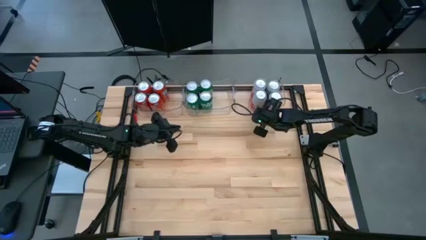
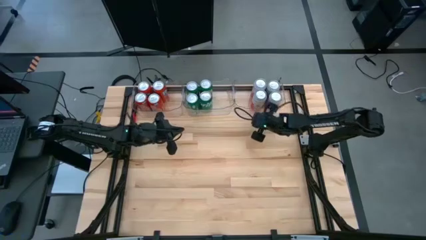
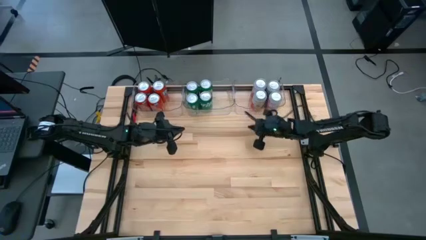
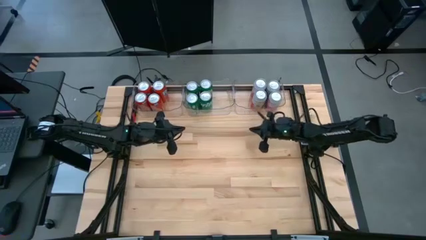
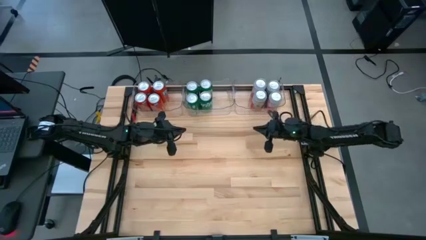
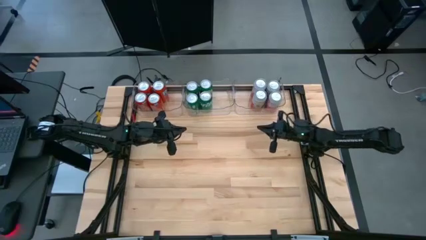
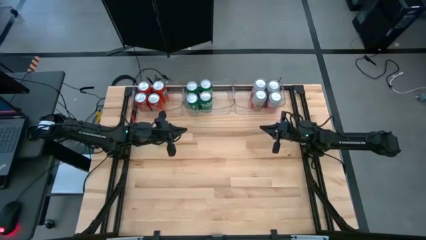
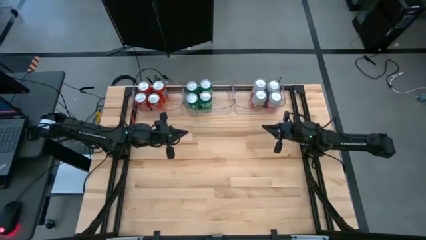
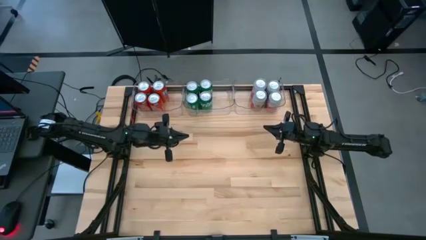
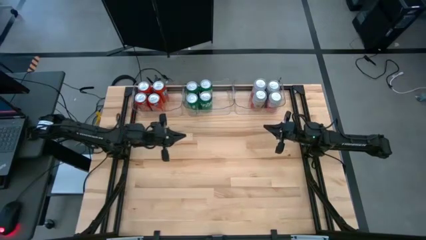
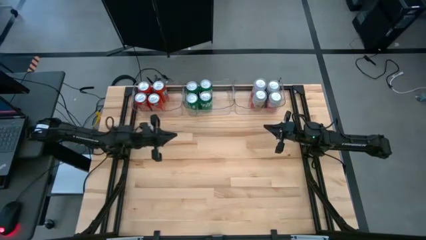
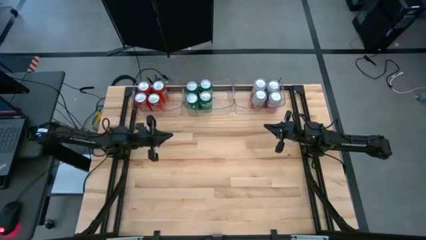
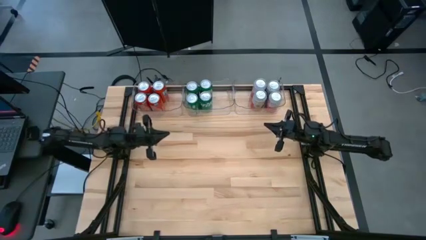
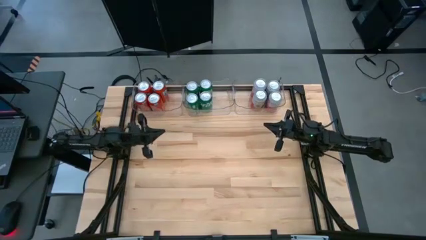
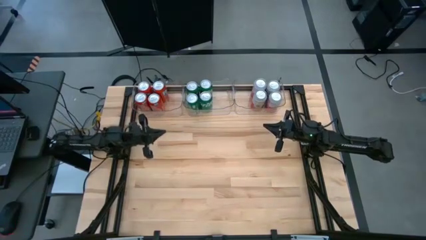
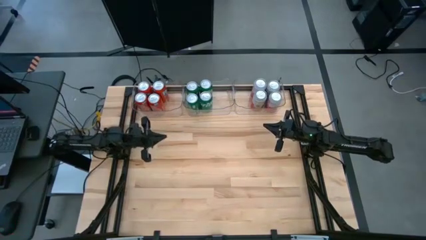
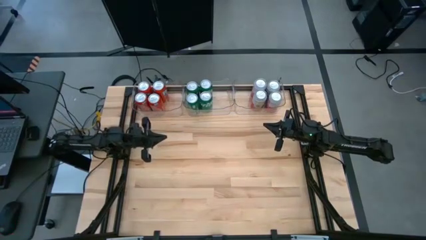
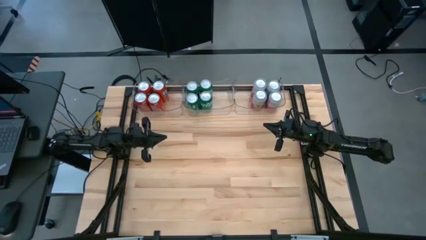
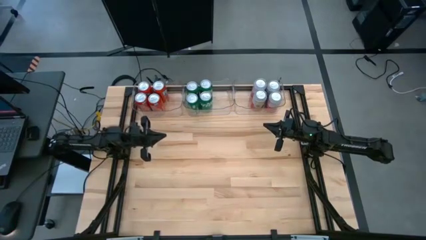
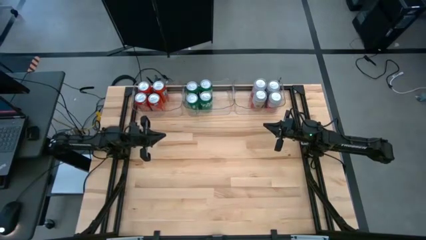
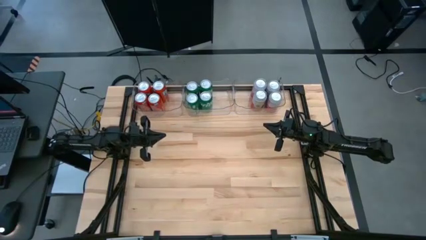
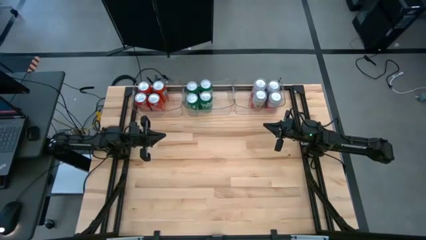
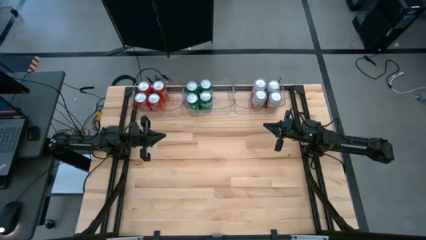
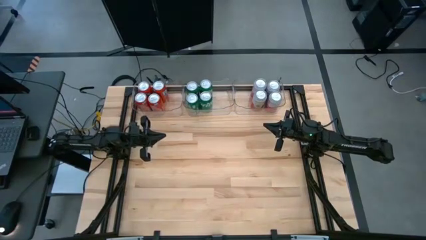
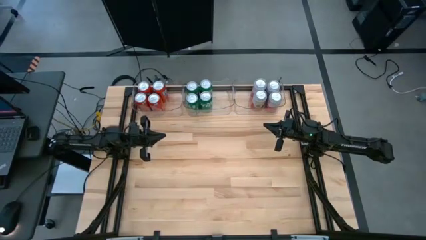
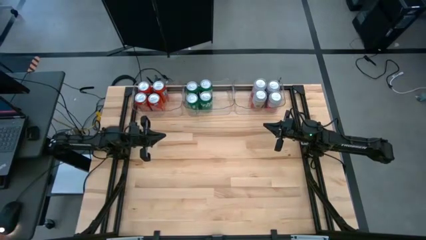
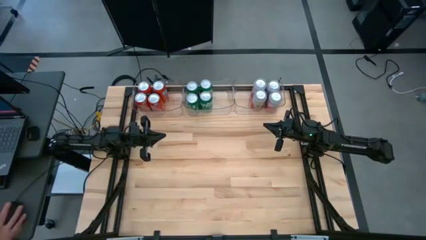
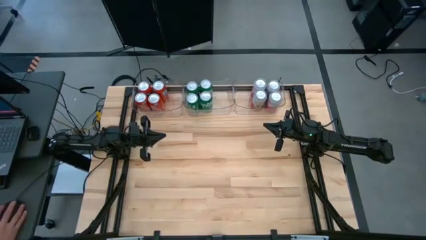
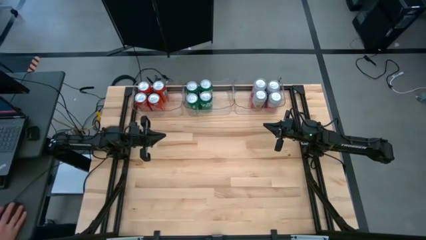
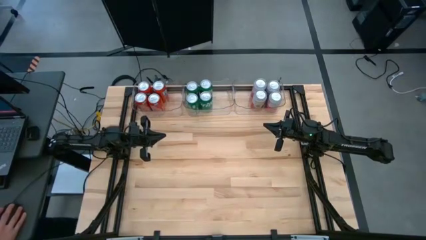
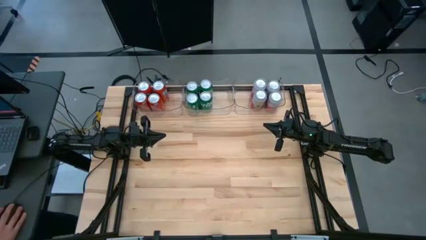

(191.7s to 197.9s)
Task: Sort soda cans
Return to Home Position

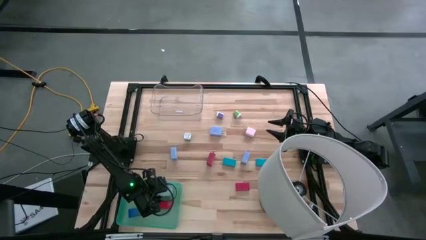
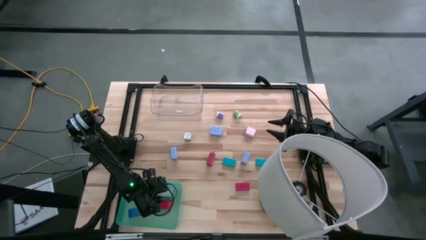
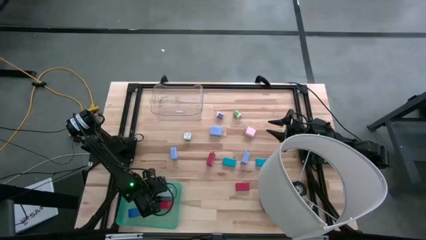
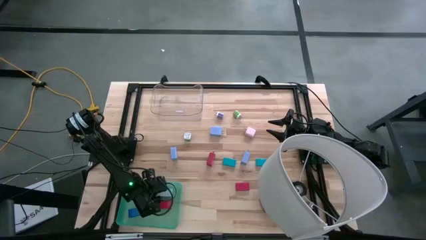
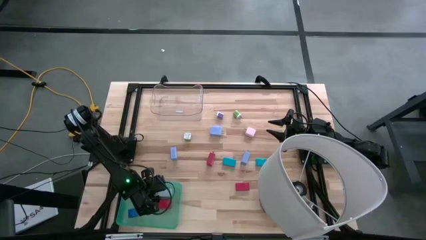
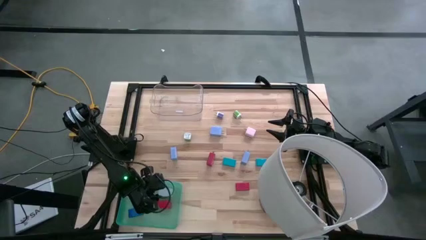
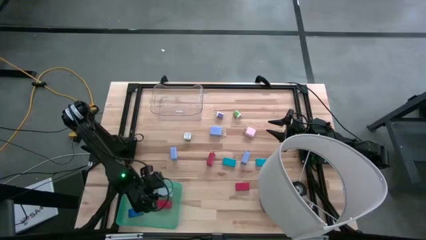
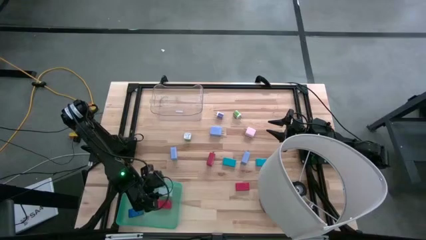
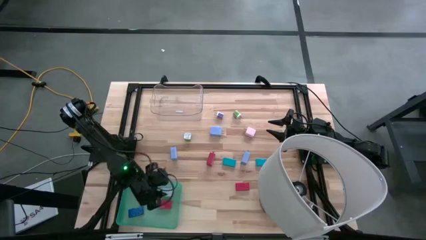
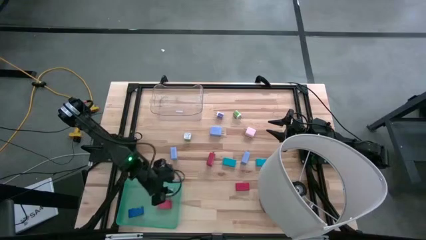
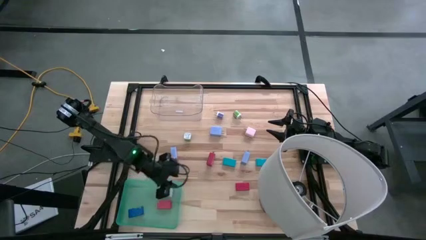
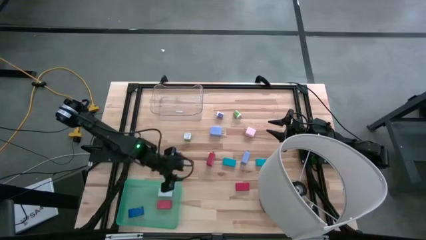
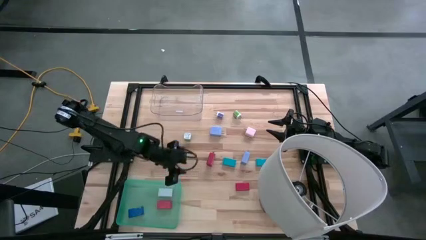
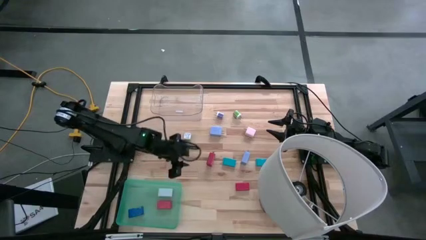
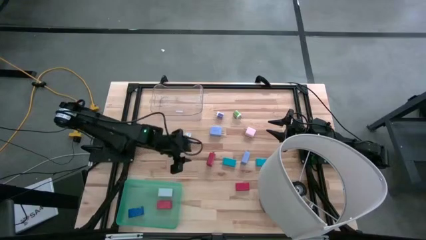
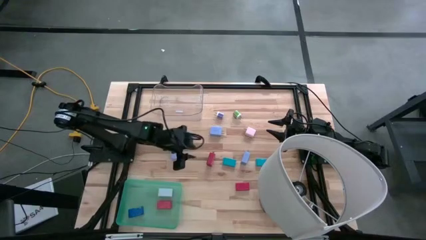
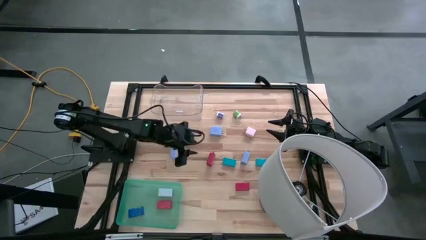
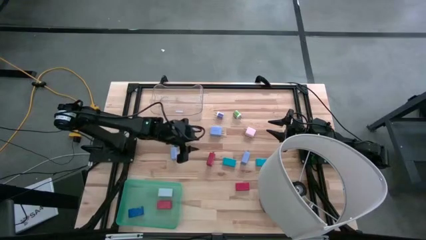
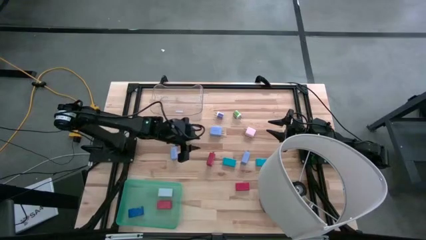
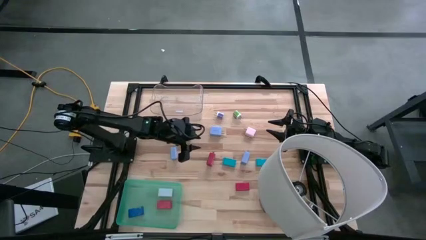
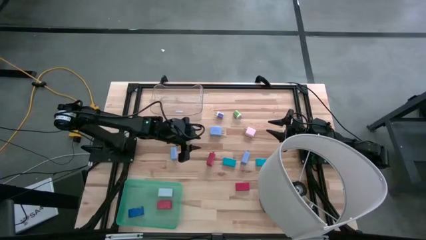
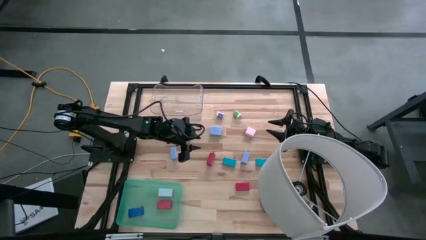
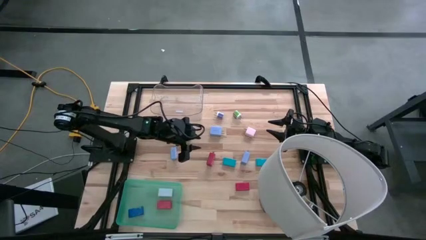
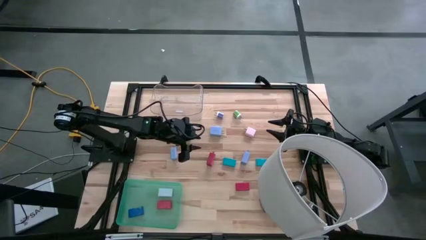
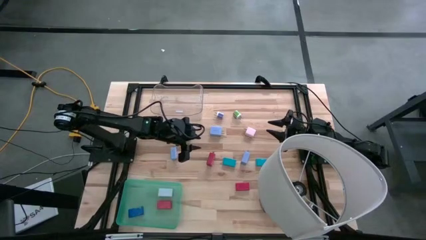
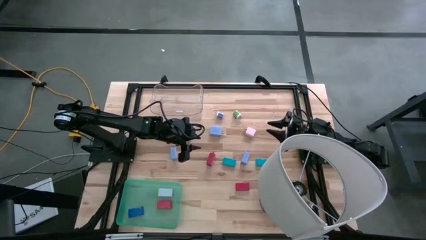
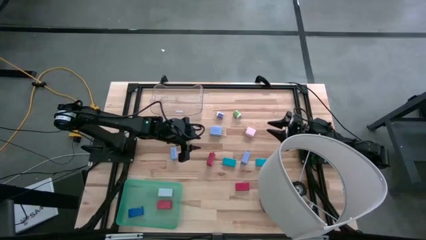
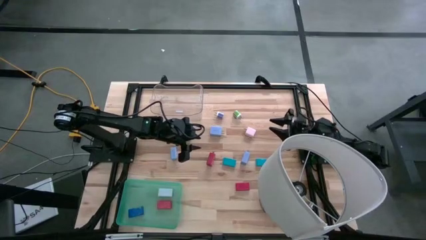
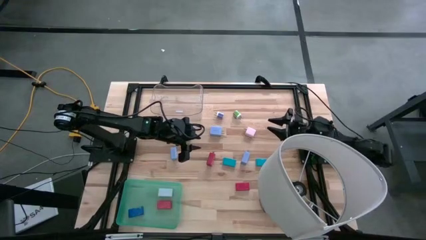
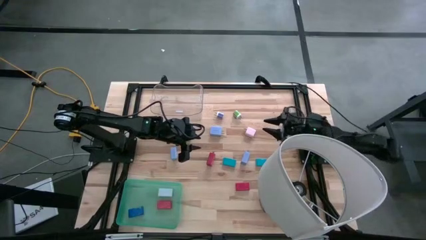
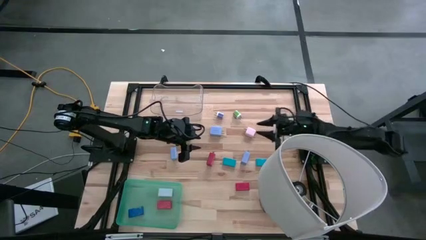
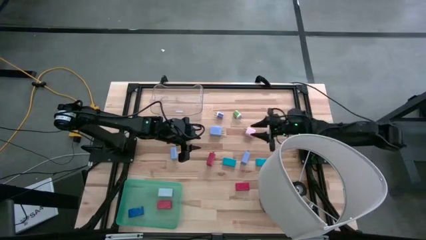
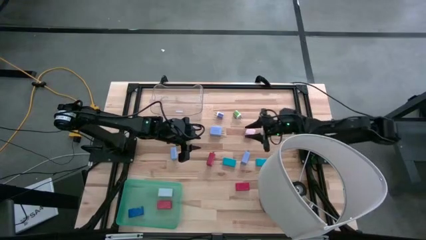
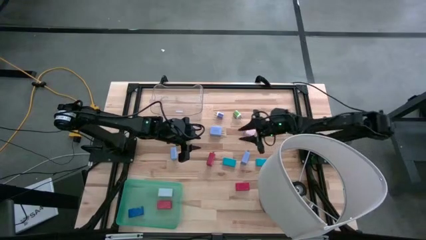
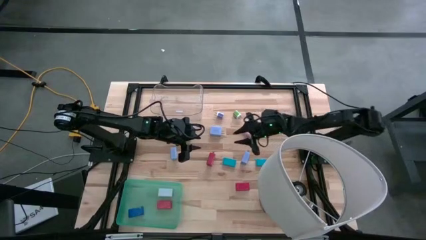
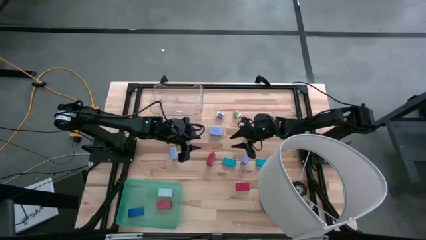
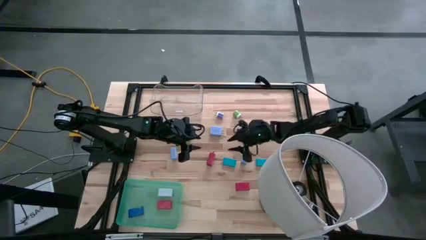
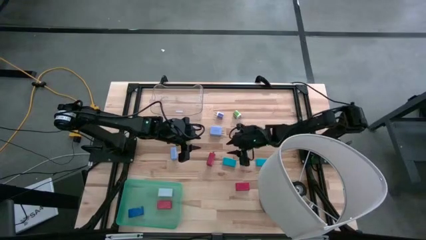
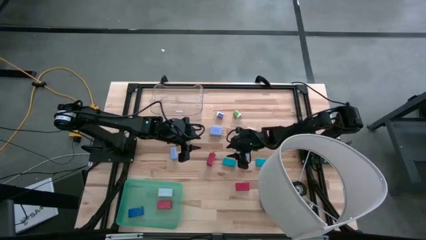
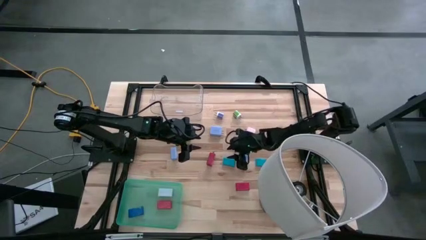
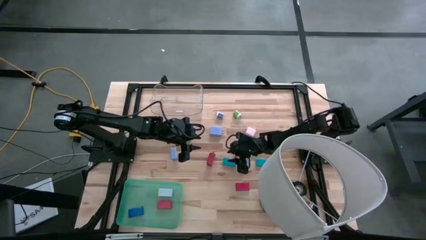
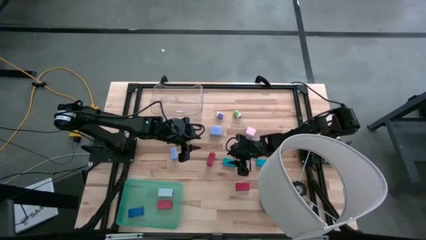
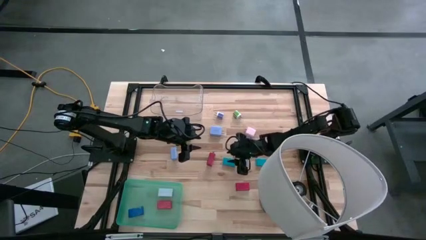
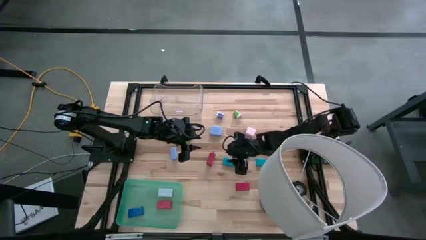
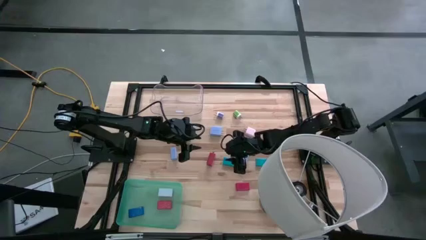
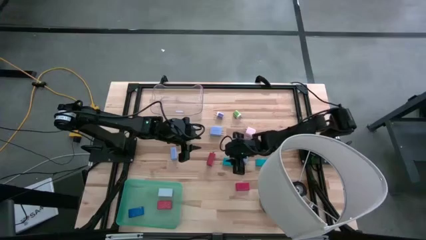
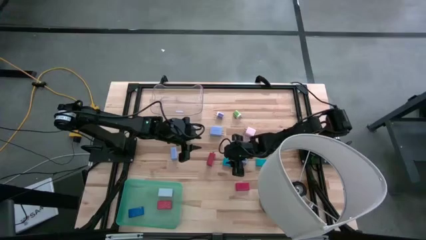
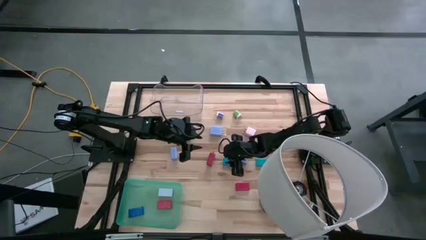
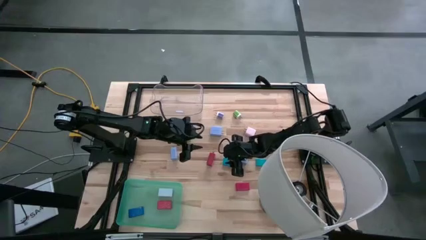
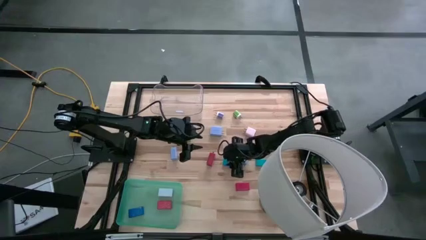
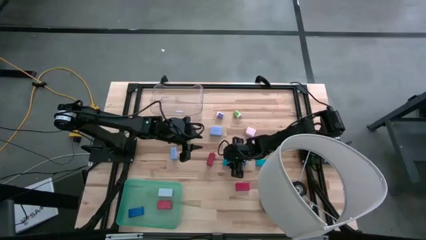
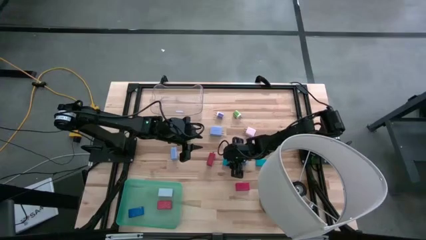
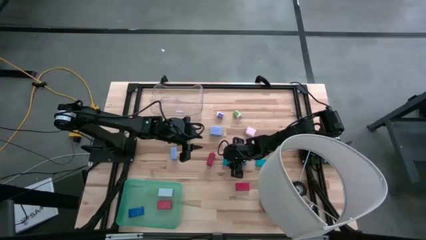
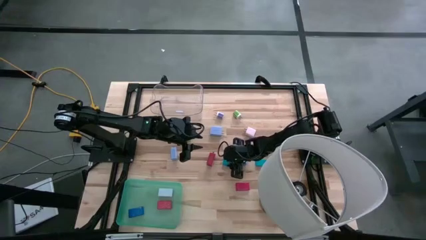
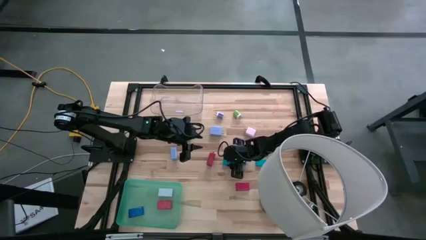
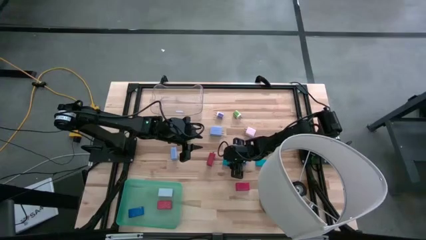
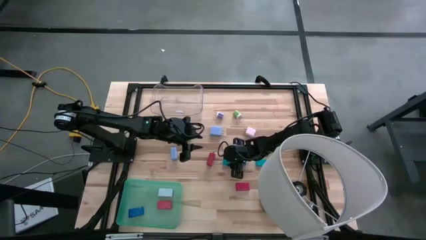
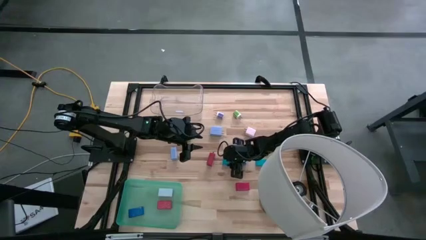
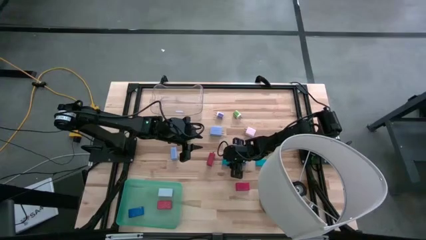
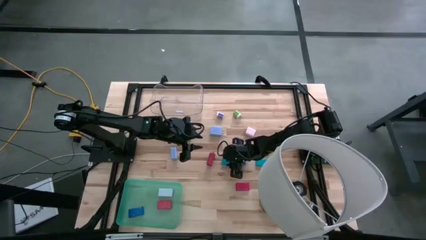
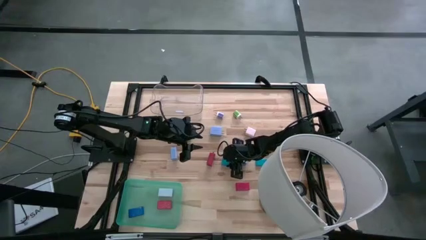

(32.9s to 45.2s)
Task: Pick & Place Office items
Put the left light blue digital clock into the green bin
